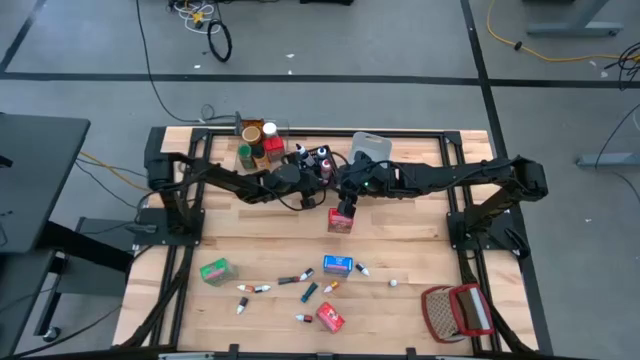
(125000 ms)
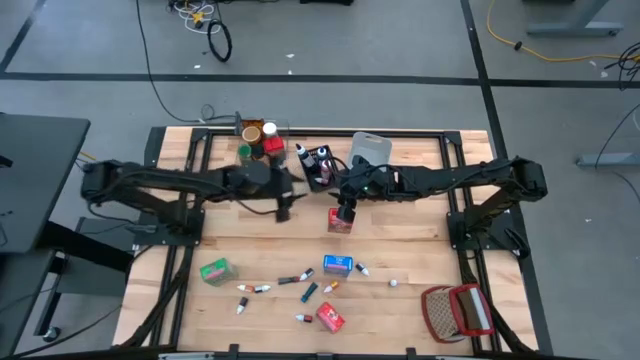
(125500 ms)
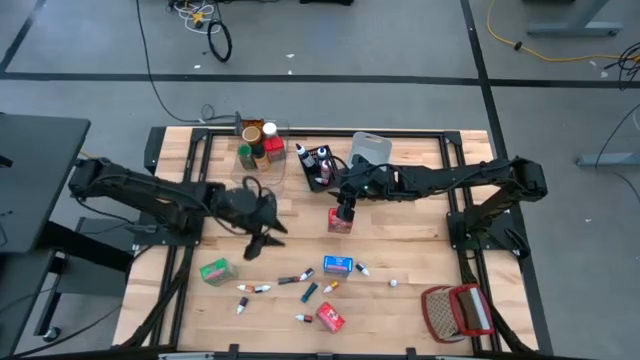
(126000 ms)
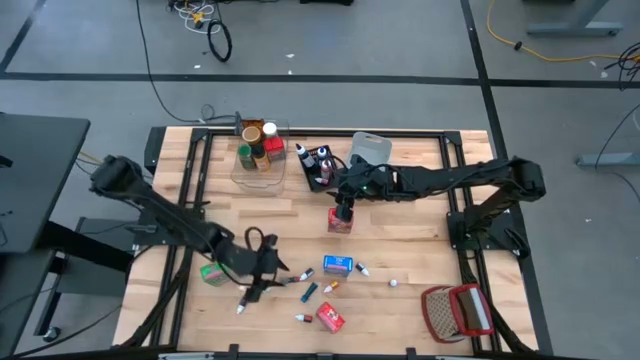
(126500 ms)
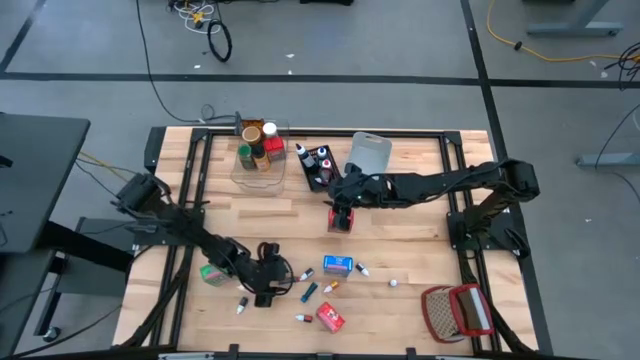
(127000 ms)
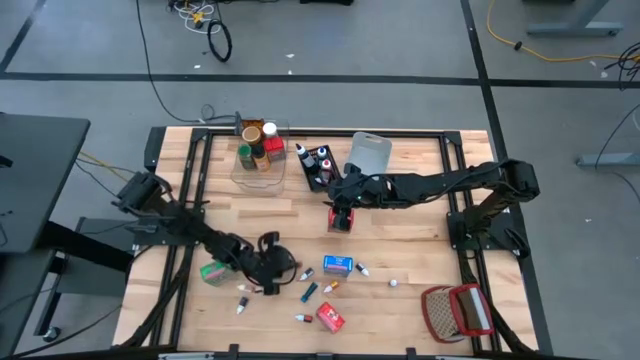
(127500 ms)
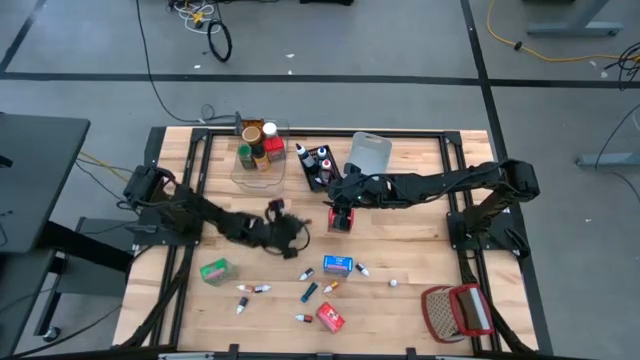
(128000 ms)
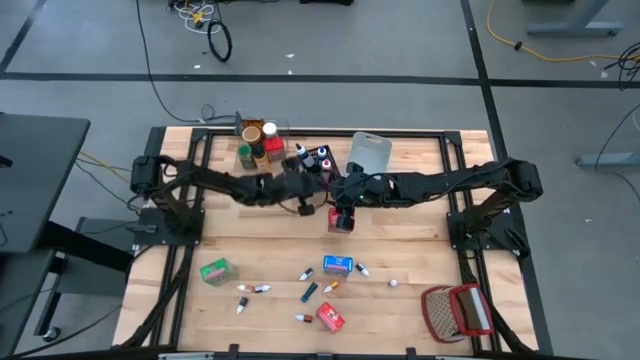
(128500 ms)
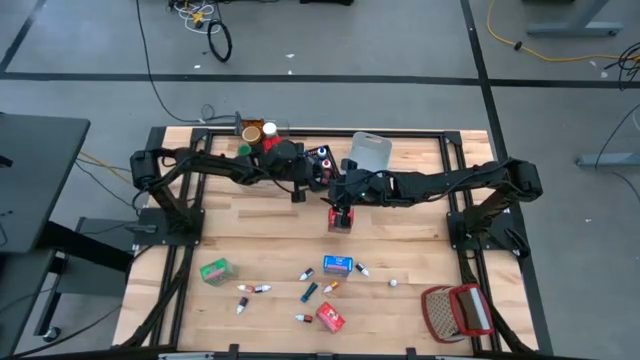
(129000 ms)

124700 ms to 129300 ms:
Task: Pick & Place Kitchen Items
Put the red food coloring bottle into the black bin

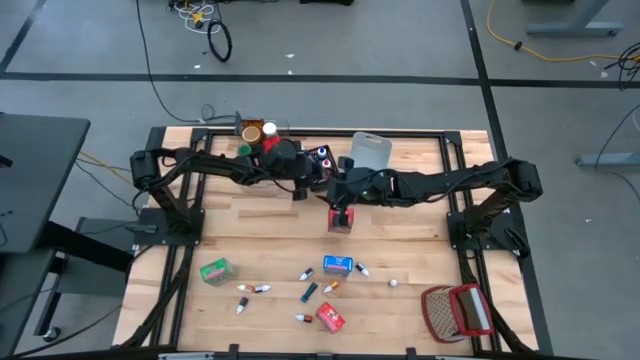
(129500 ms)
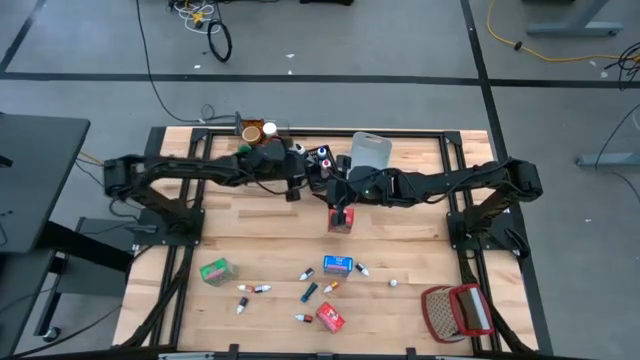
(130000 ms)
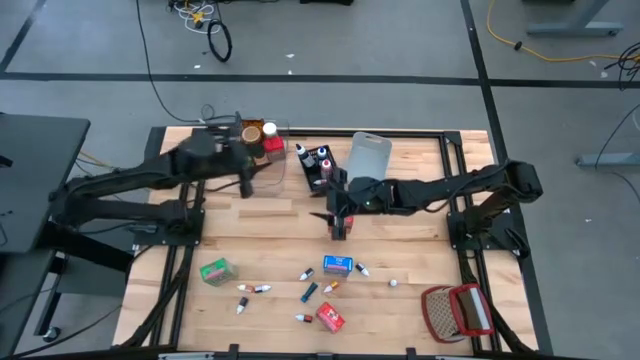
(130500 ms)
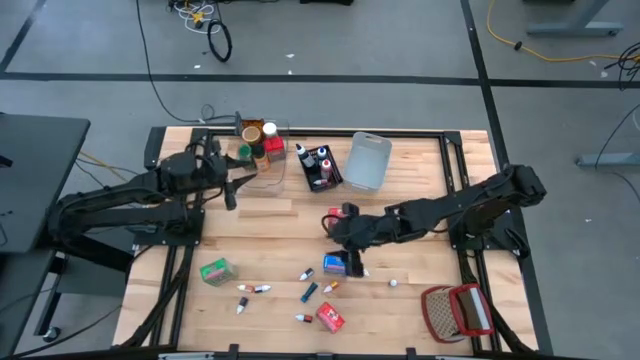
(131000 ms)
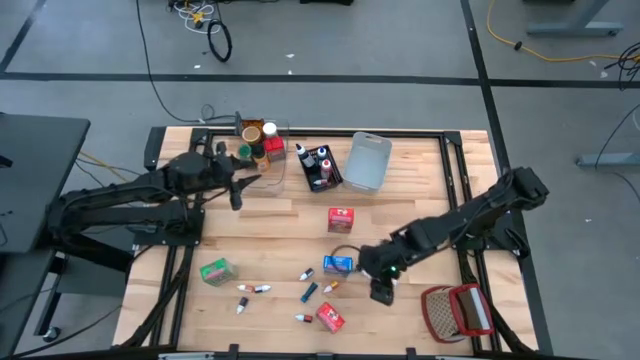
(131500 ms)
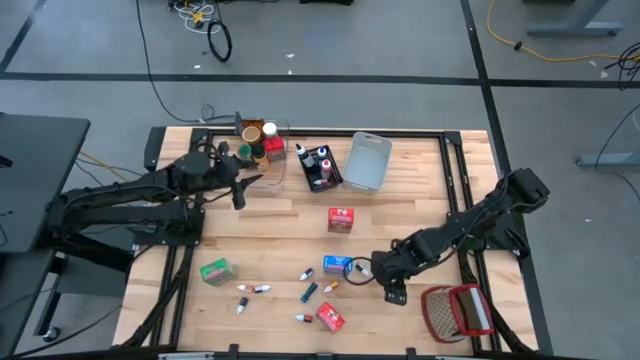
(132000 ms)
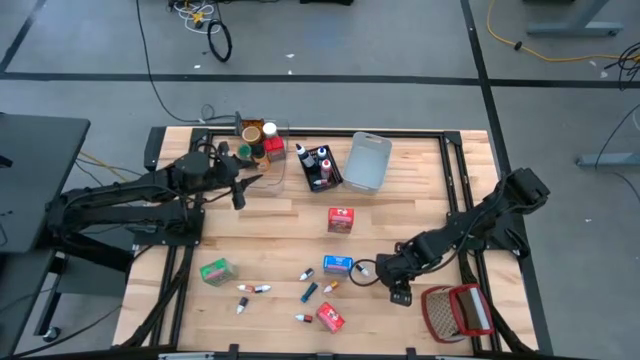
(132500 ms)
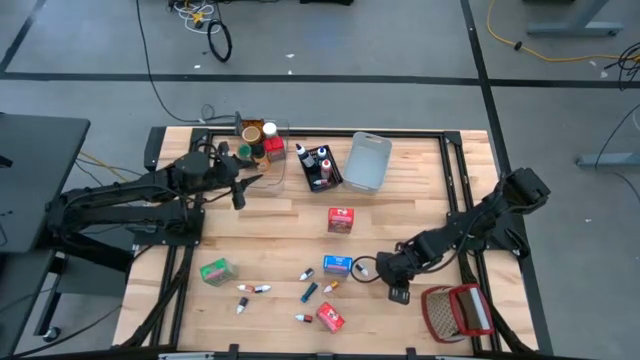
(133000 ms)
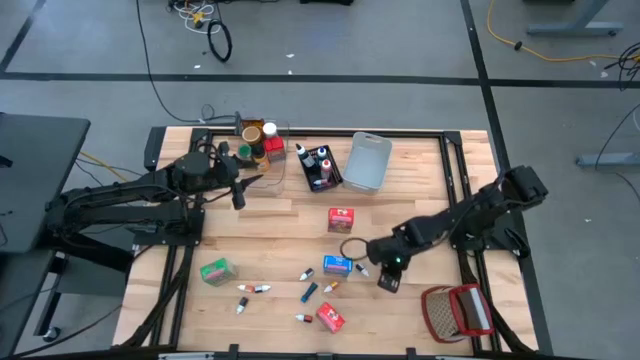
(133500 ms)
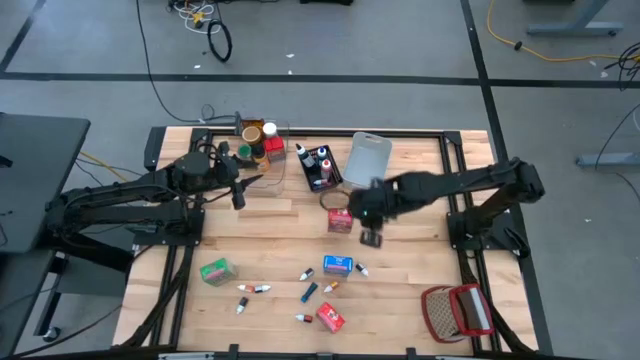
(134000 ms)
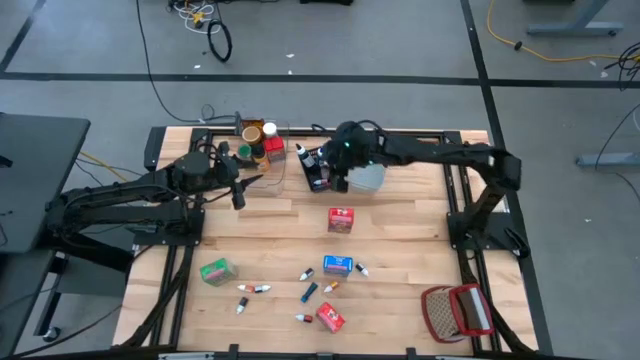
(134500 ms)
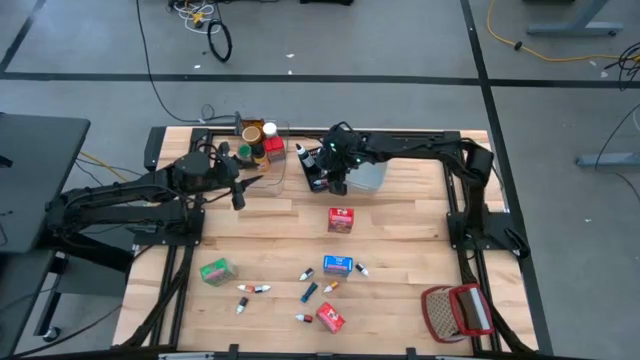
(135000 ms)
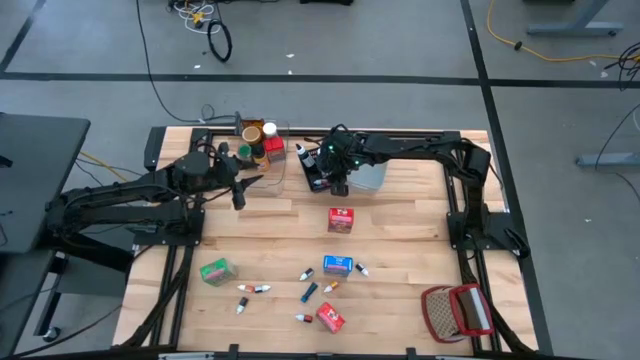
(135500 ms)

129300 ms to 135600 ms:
Put the green food coloring bottle into the black bin

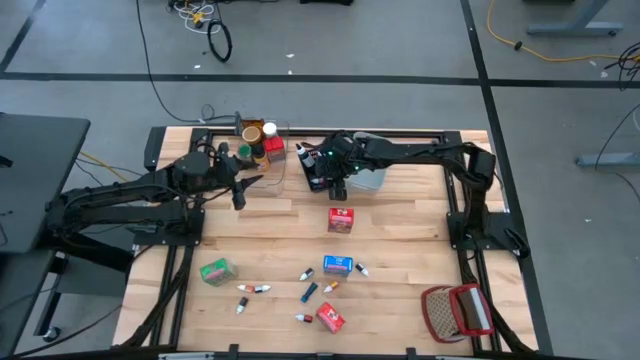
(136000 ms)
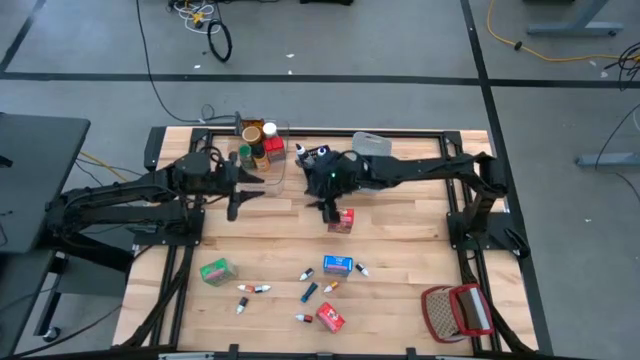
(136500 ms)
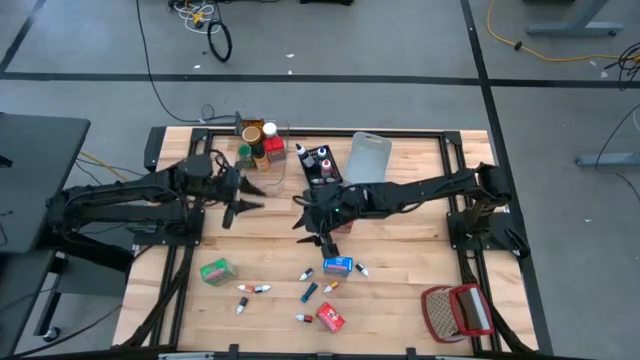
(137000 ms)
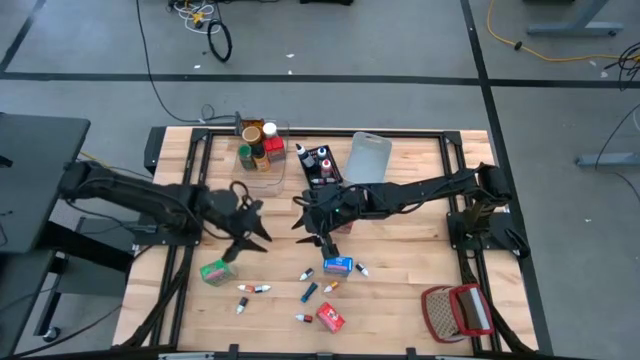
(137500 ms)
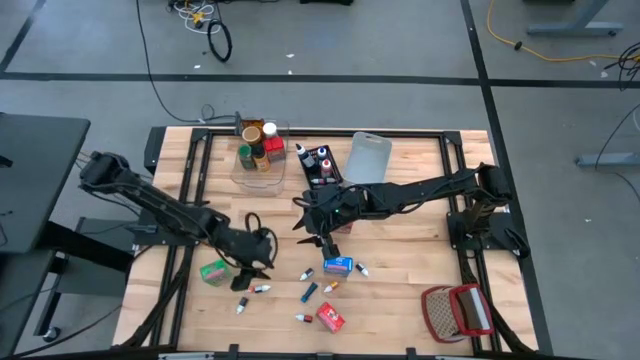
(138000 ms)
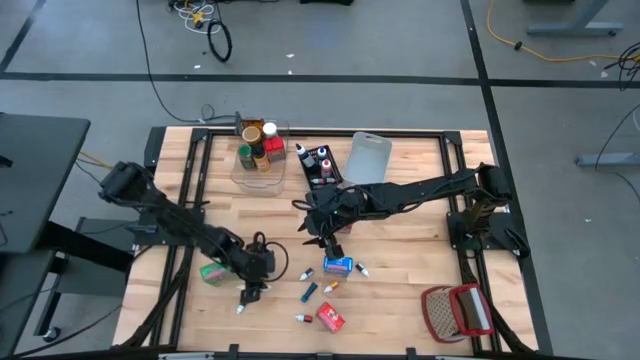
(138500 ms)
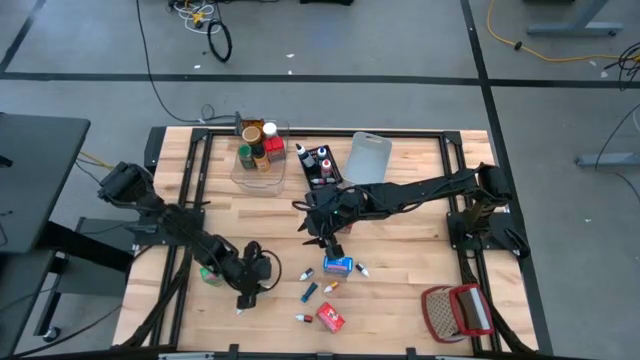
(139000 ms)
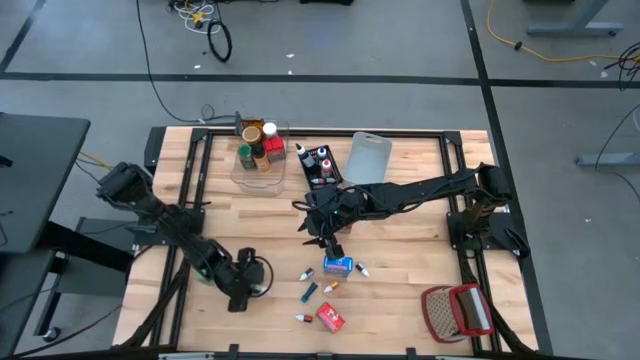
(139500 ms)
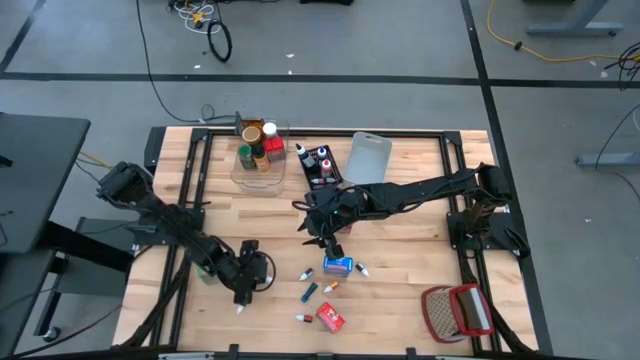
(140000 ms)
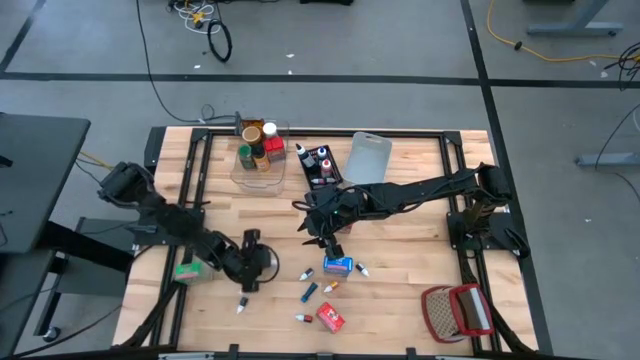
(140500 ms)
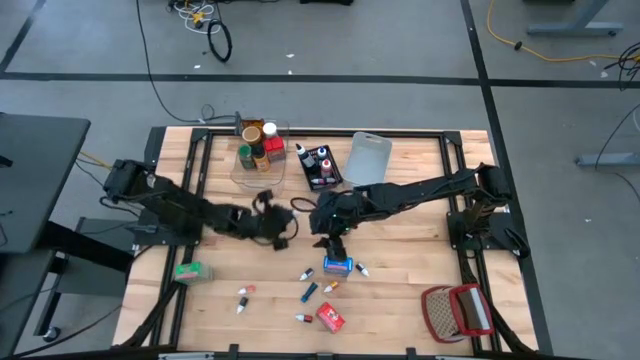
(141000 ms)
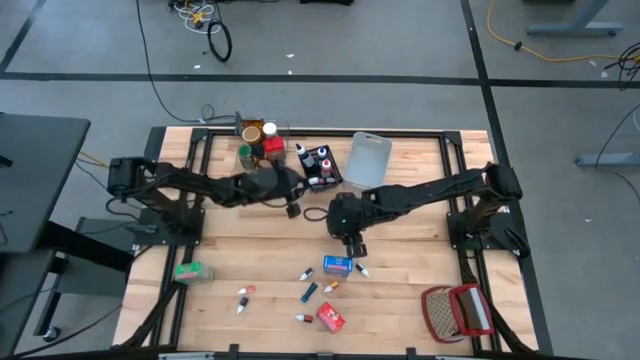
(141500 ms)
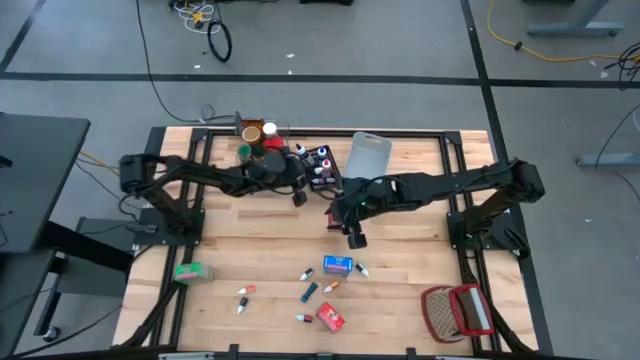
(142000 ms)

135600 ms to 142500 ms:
Put the left black food coloring bottle into the black bin

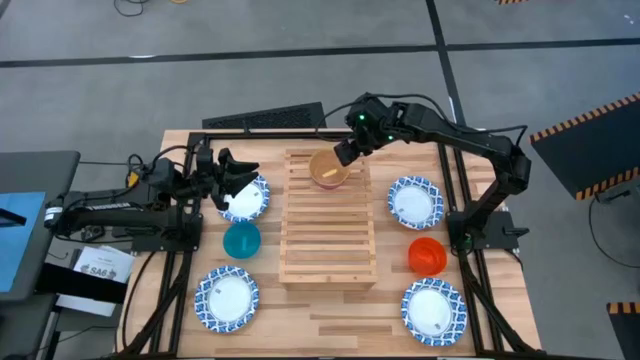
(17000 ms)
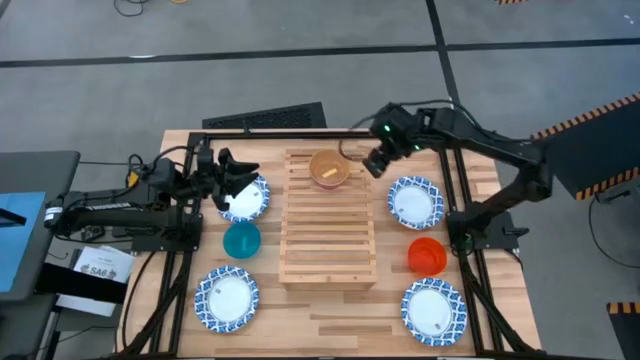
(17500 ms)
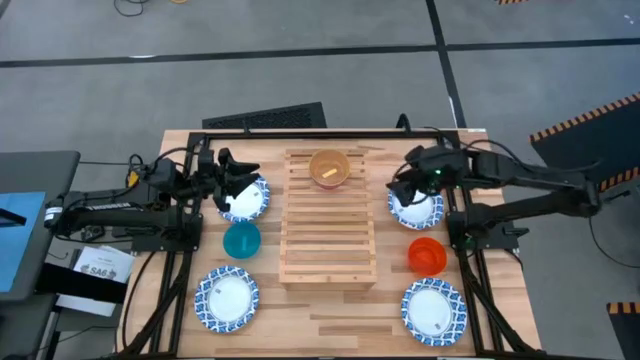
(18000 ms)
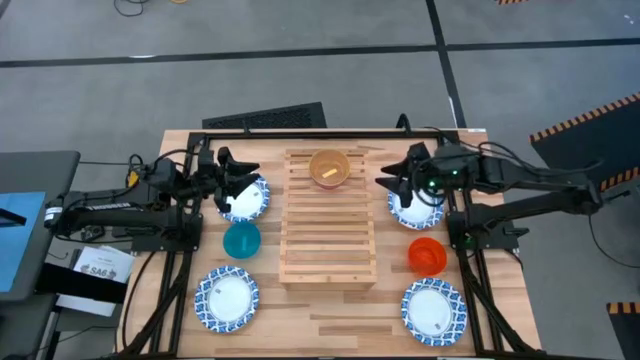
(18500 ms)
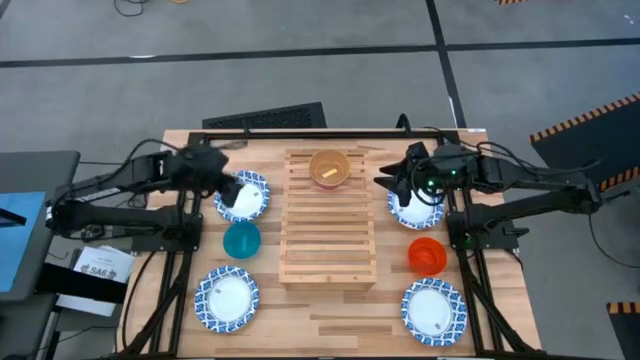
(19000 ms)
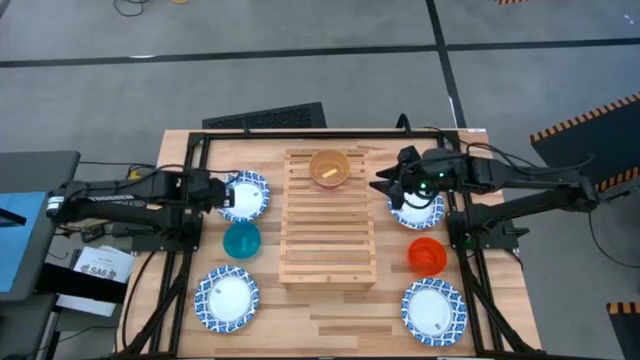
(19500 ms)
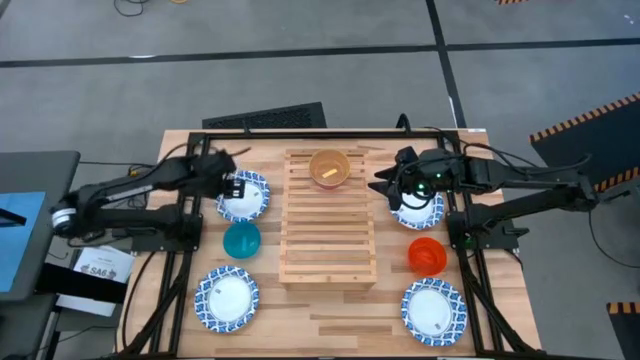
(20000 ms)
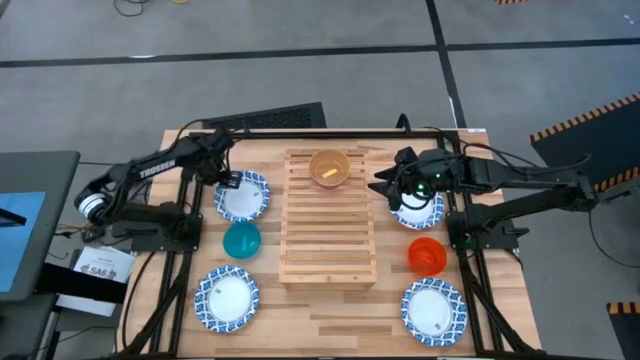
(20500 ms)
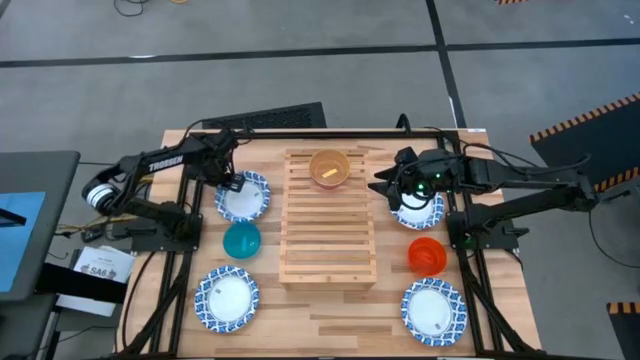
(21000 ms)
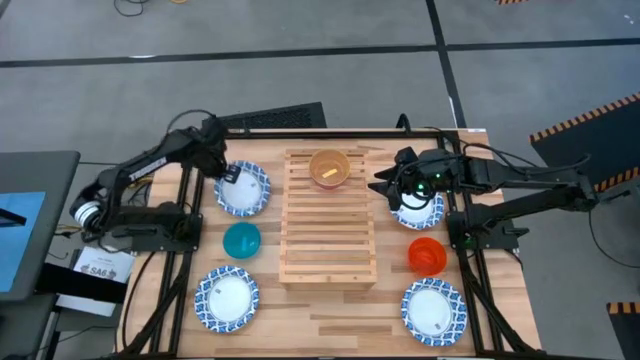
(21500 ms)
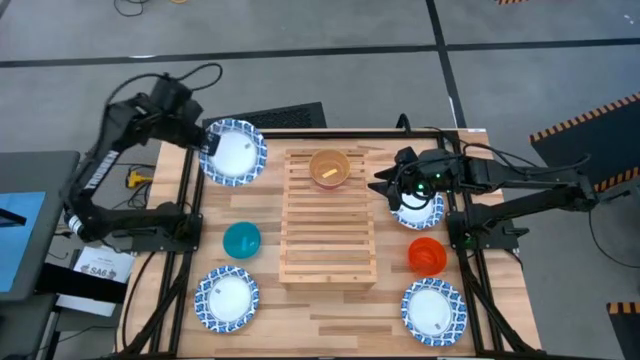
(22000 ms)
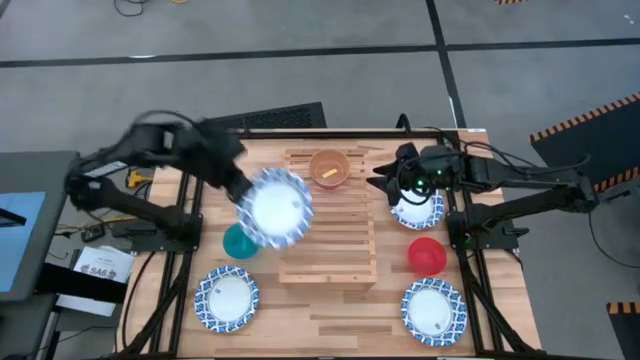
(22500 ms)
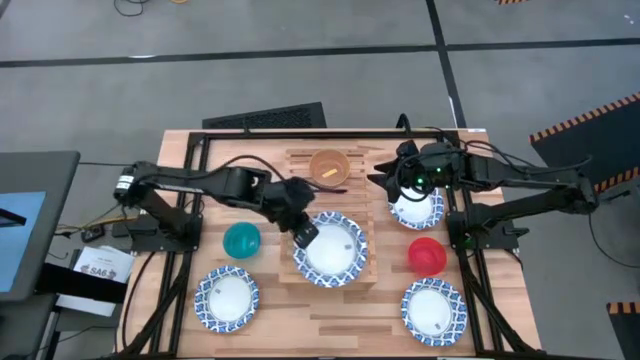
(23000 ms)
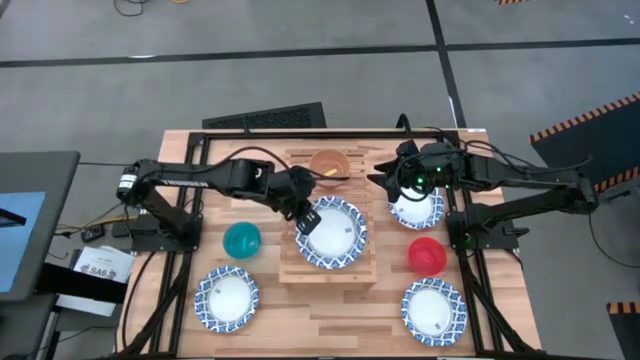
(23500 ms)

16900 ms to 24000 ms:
Task: Place and stack bowls onto a shelf
Put the top left white patterned bowl on the shelf
